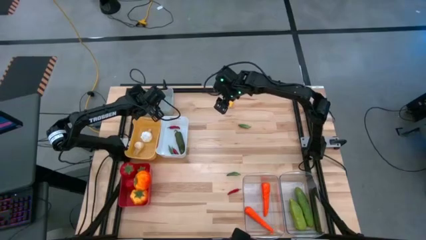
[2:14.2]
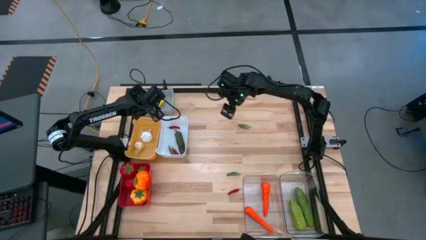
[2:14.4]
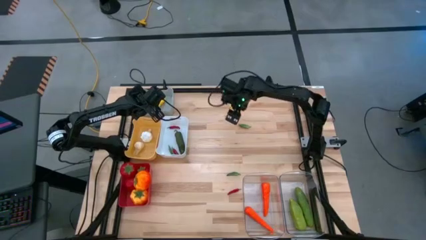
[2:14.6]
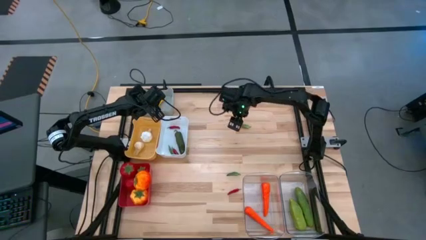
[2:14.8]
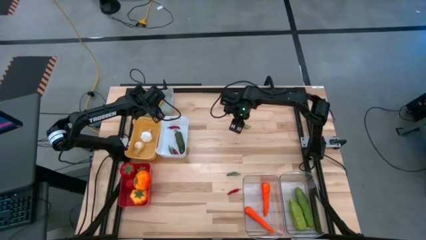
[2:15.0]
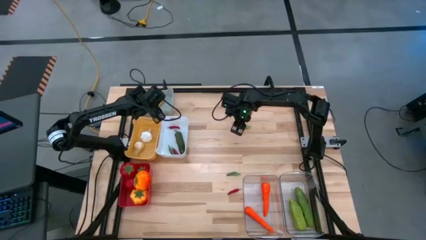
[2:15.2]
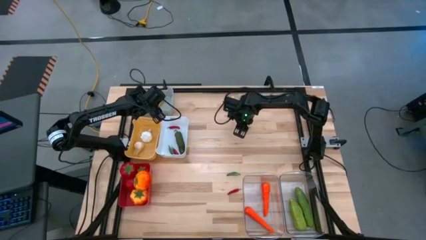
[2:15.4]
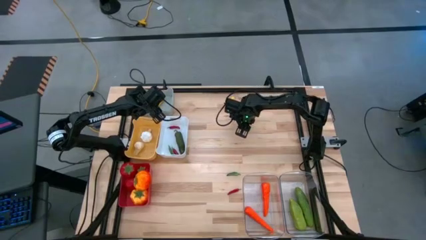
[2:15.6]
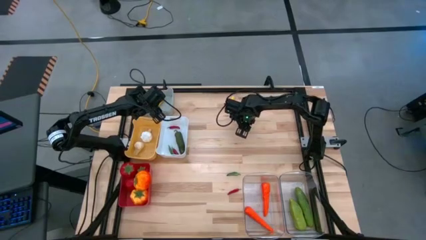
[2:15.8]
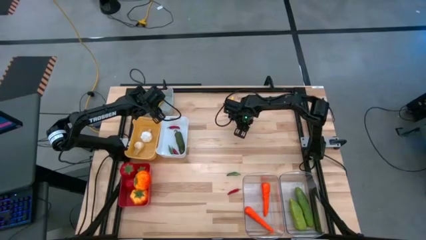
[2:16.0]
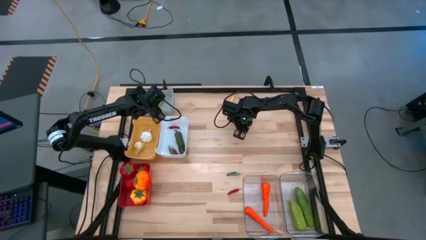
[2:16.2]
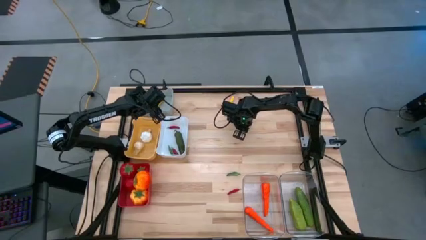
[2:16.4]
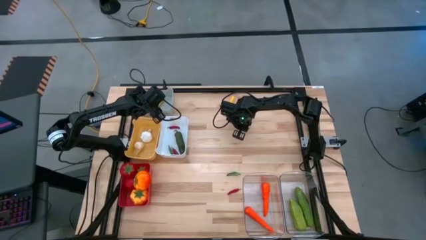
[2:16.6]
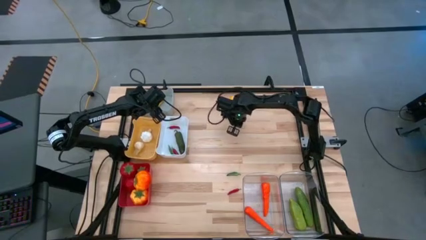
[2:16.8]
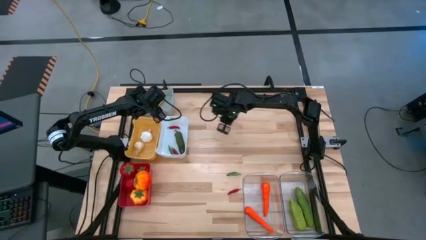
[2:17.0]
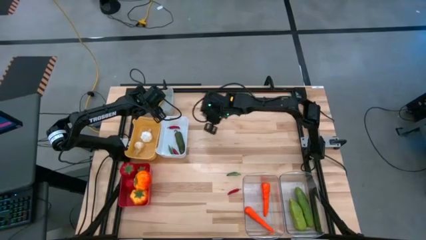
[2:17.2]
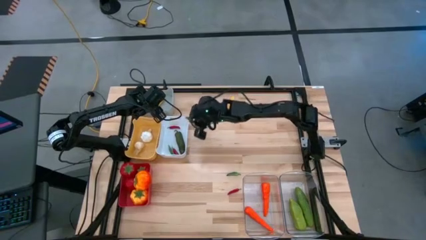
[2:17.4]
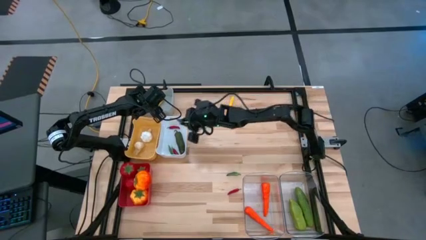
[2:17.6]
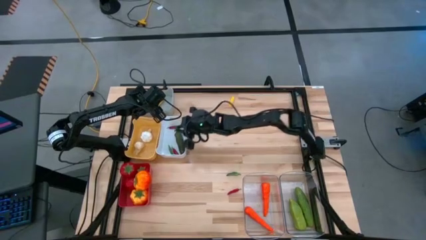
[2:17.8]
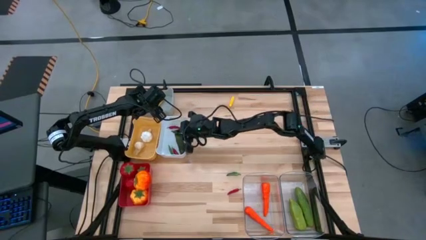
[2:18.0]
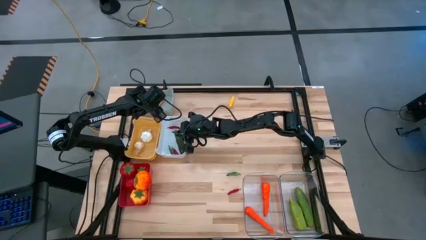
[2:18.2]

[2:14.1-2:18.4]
Task: Sort produce into baskets
Put the top green chili pepper into the white bin

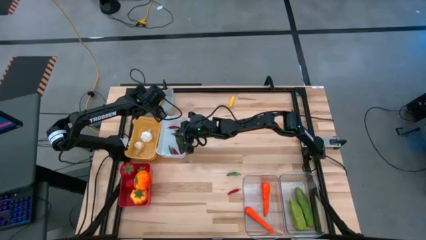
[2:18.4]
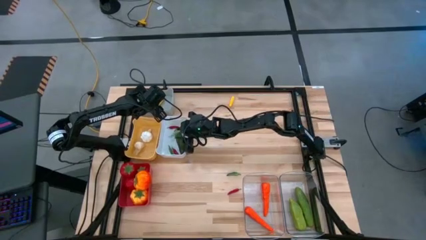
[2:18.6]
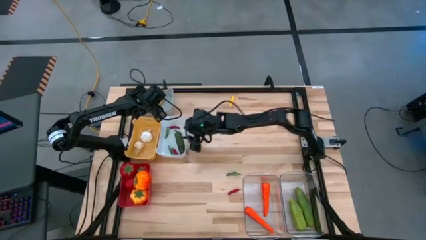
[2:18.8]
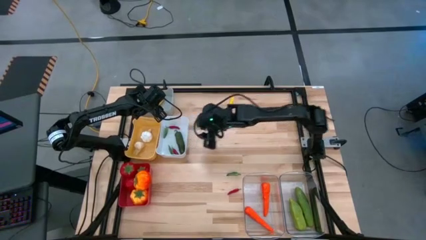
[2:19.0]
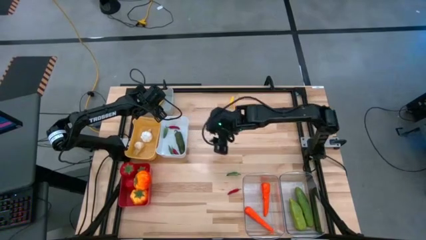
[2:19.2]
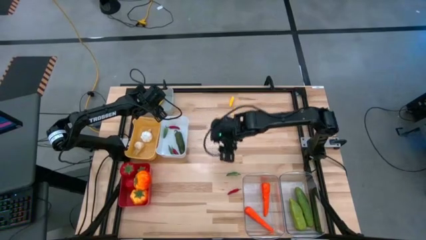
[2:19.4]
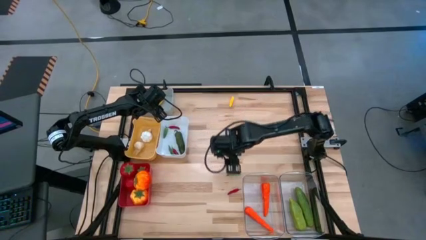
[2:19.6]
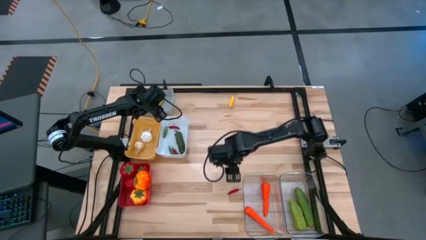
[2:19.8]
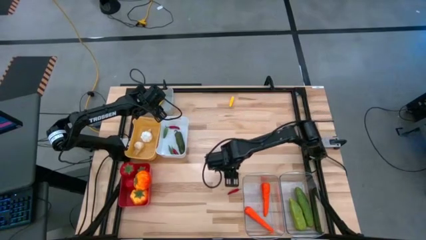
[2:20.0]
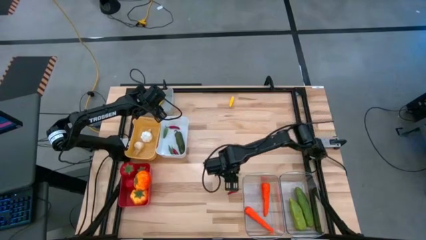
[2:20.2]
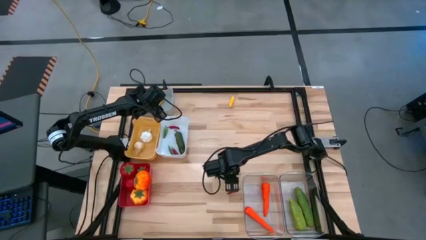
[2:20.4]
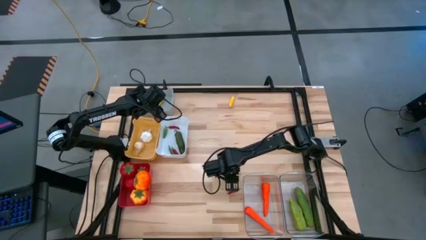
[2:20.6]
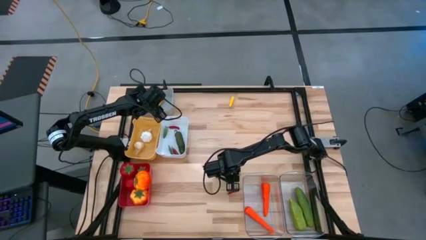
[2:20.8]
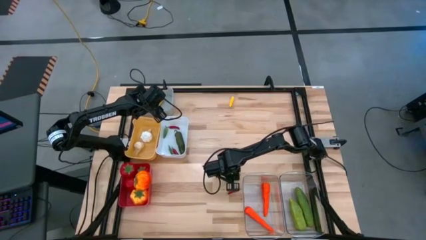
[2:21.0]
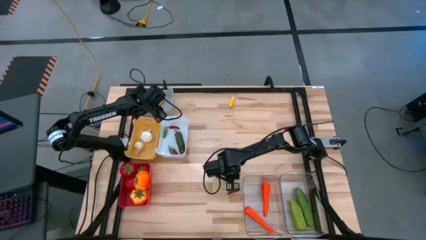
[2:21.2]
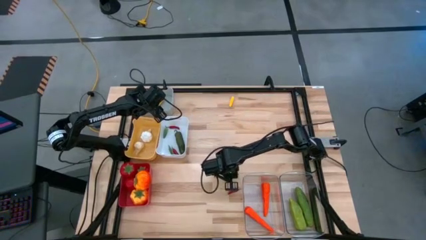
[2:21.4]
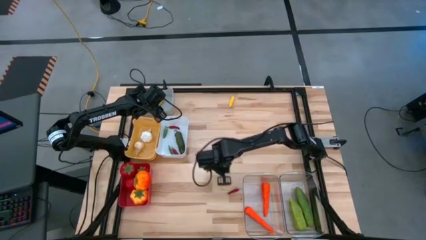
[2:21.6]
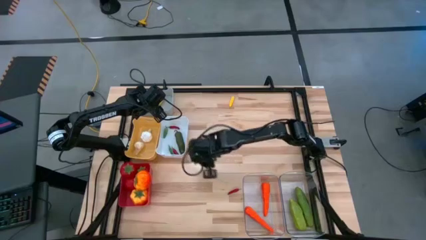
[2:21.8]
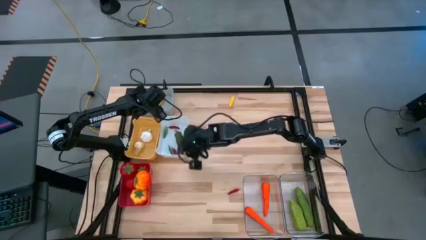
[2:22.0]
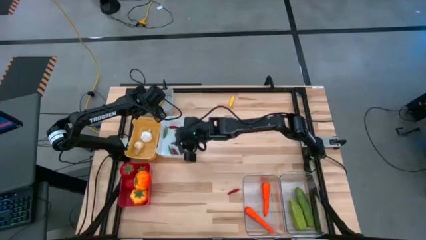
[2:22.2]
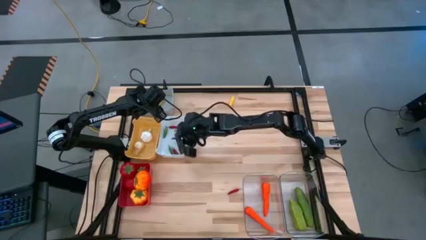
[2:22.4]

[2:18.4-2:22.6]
Put the green chili pepper into the white bin

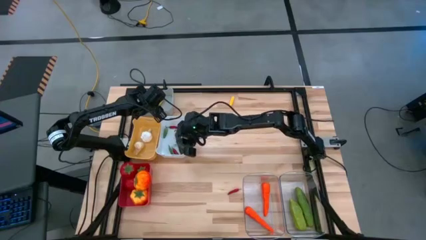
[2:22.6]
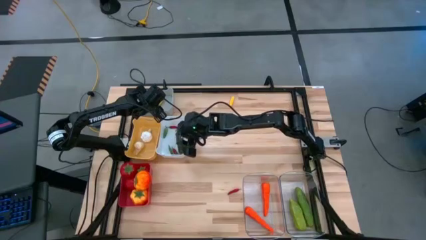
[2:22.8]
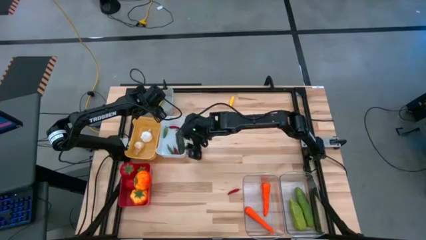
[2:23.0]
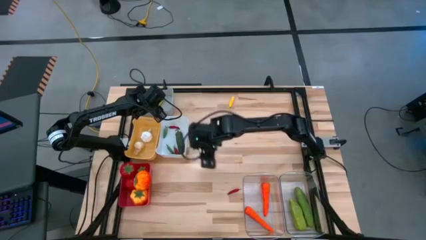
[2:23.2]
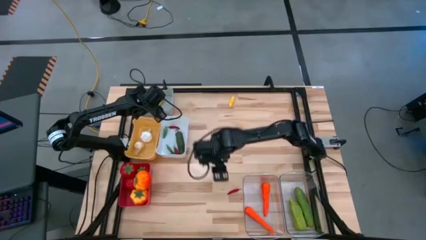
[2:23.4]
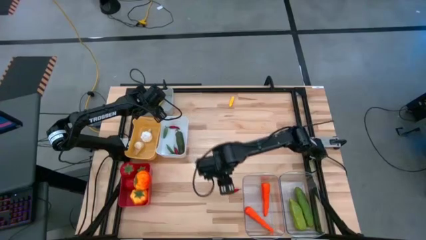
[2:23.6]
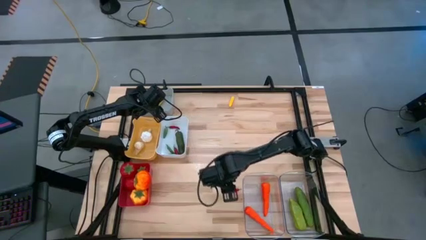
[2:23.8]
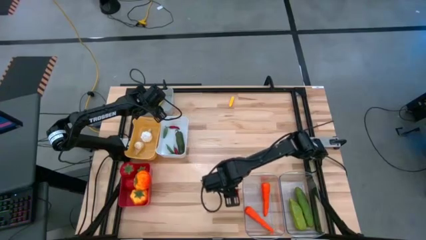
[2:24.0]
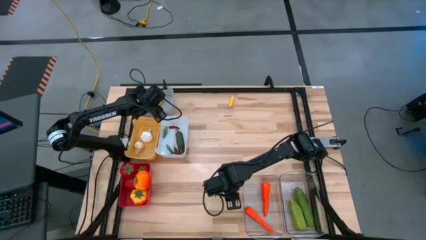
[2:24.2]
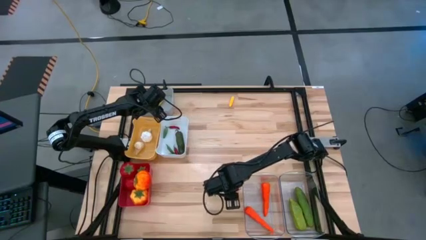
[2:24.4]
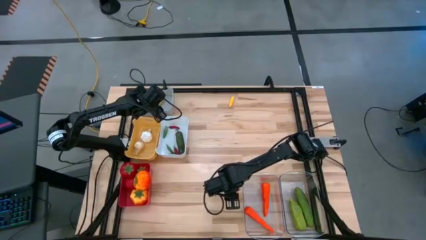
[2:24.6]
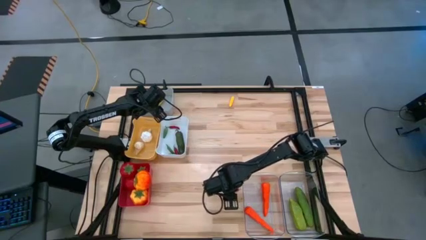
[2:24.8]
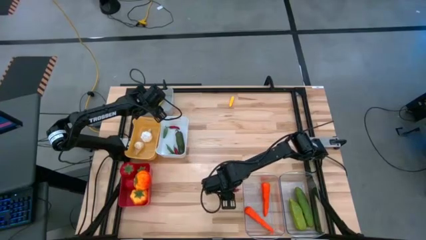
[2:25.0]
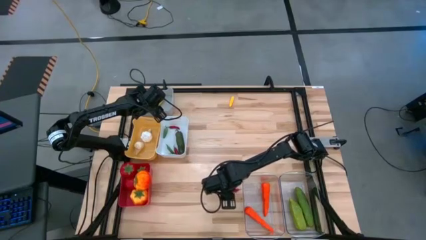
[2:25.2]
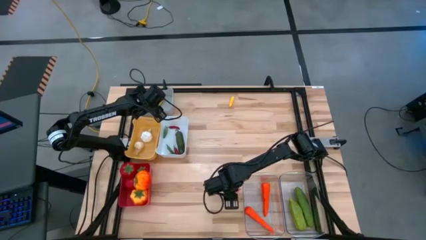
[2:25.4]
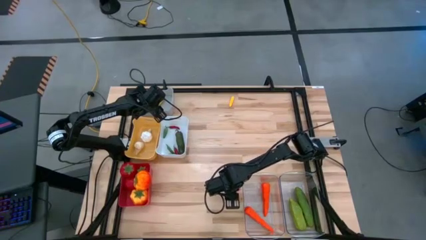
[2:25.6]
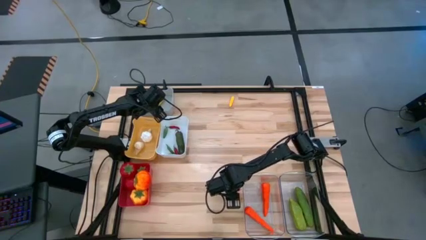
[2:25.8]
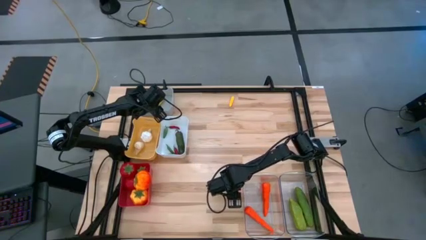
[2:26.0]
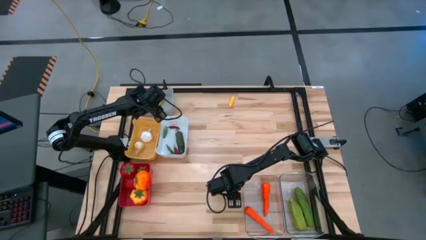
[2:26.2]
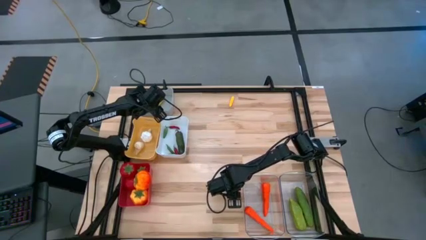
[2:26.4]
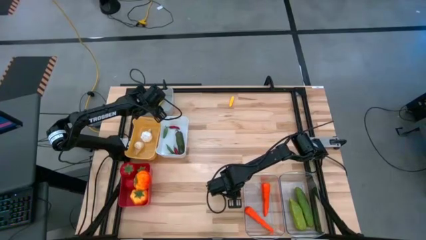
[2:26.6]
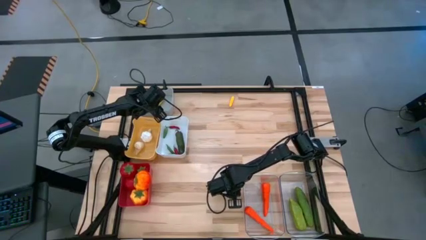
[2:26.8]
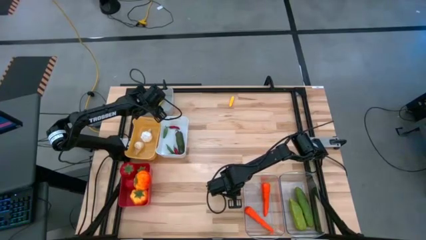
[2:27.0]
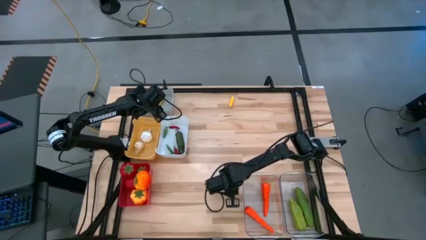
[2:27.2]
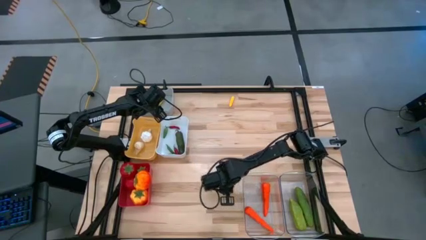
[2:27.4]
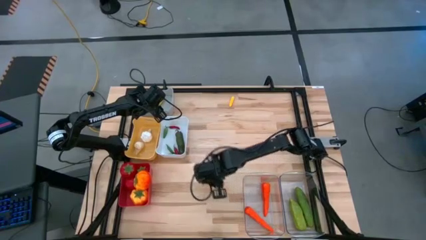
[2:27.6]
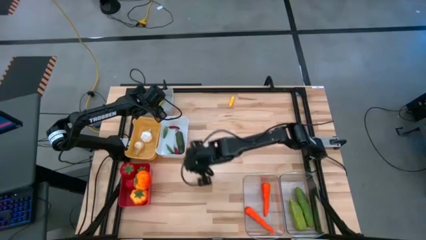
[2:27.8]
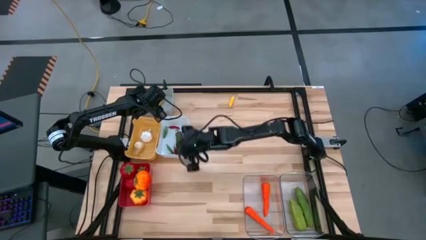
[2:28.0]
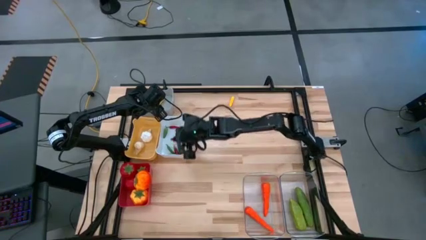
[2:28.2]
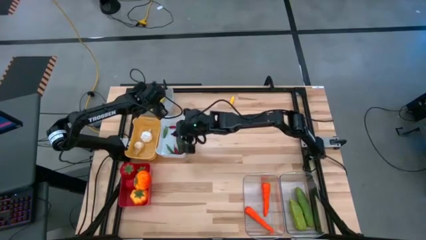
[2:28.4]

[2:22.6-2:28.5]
Put the red chili pepper into the white bin
